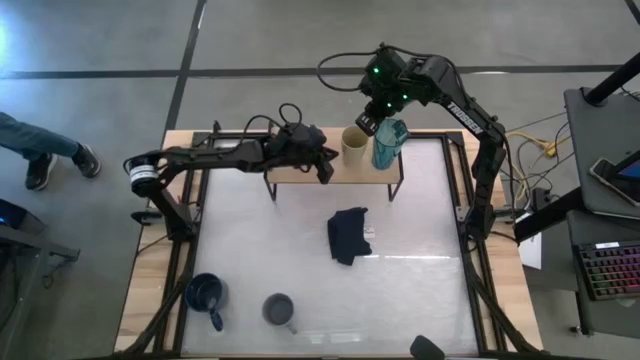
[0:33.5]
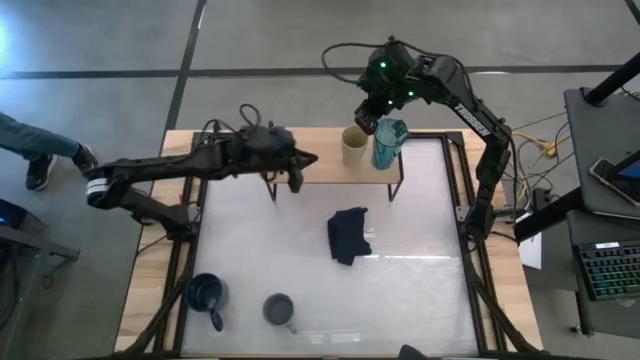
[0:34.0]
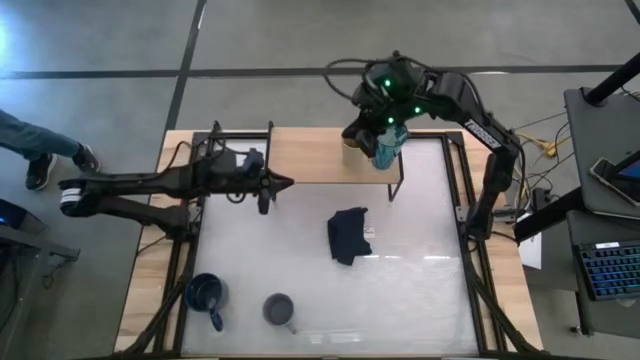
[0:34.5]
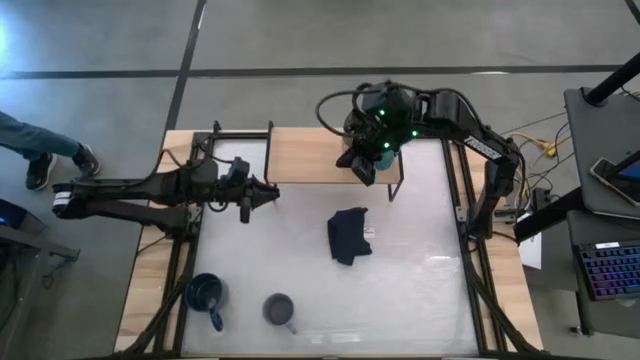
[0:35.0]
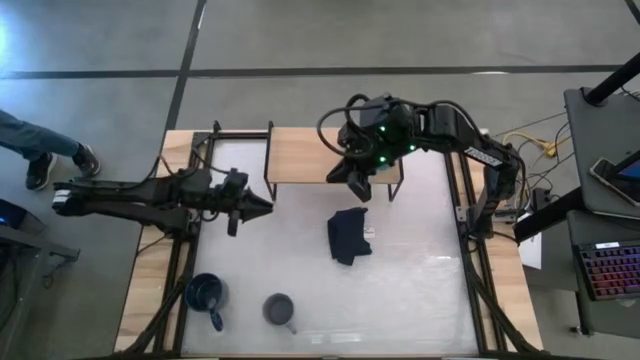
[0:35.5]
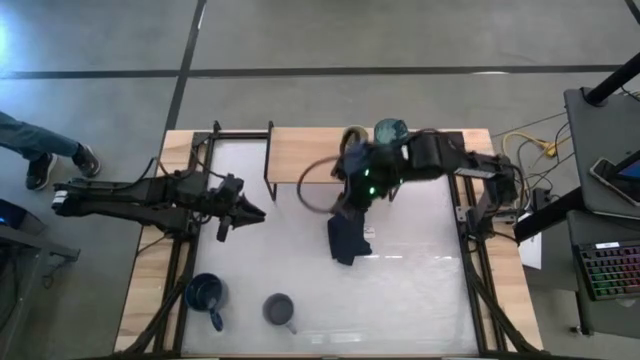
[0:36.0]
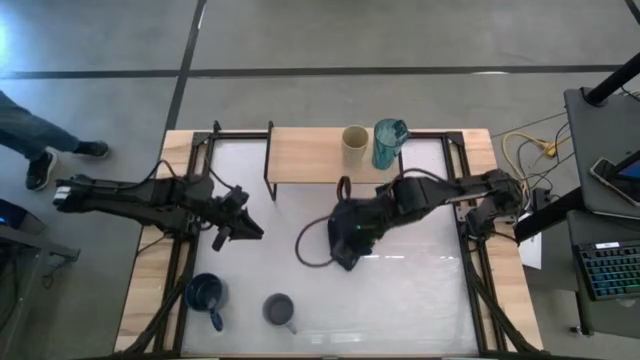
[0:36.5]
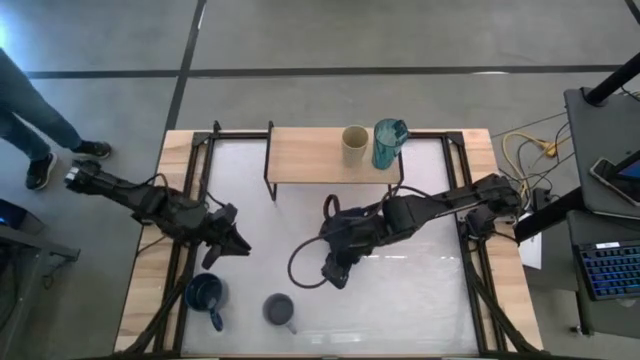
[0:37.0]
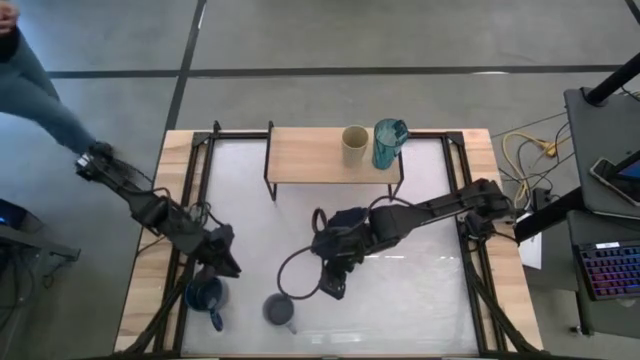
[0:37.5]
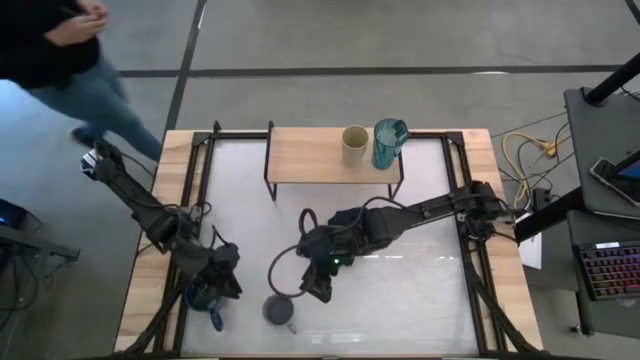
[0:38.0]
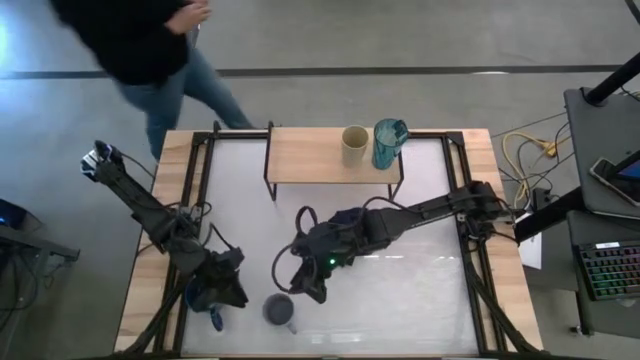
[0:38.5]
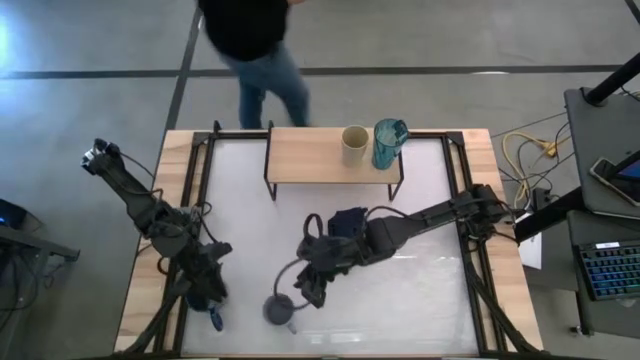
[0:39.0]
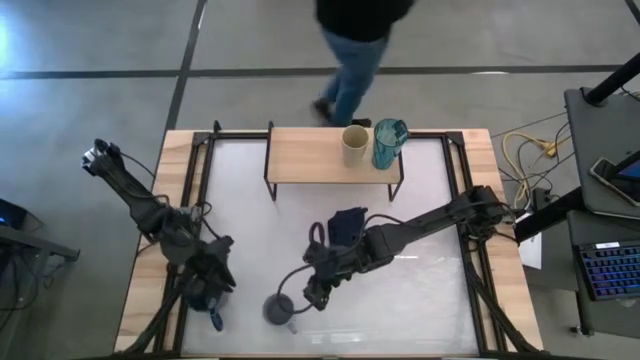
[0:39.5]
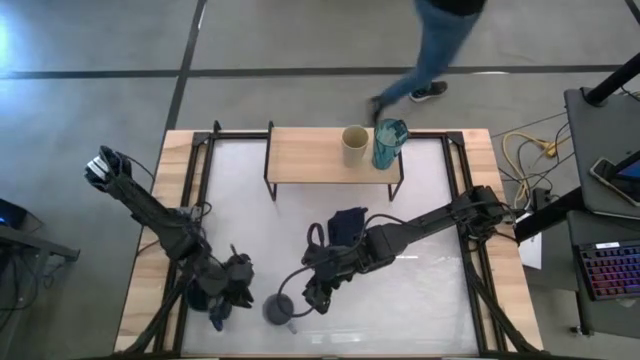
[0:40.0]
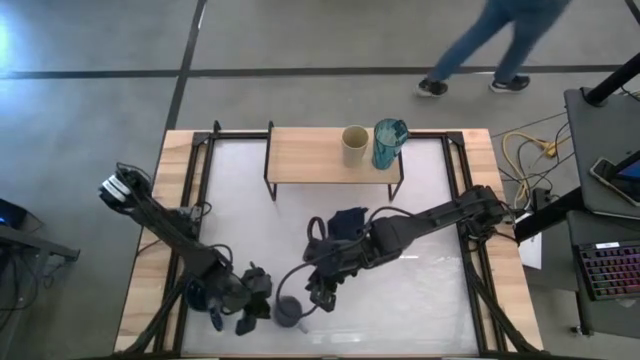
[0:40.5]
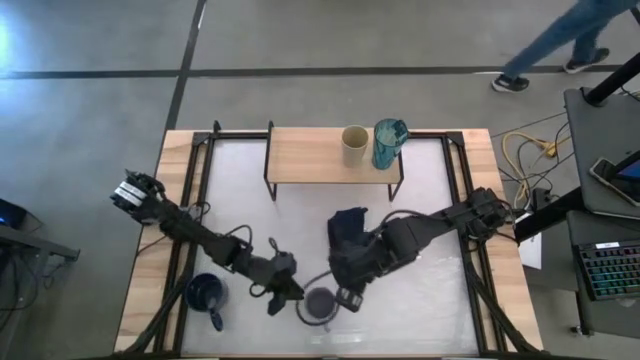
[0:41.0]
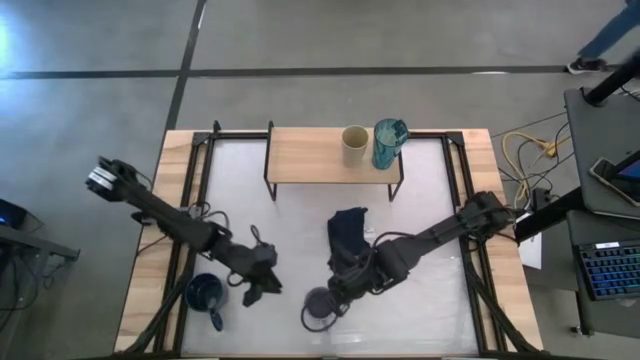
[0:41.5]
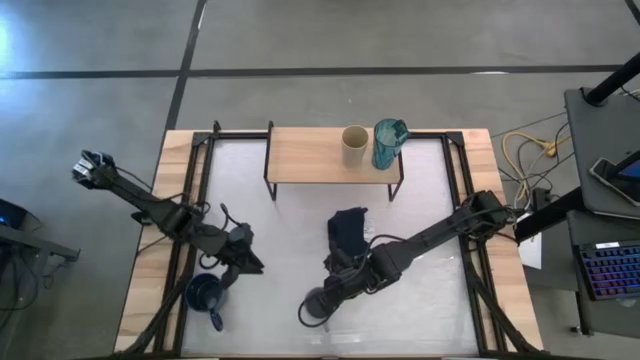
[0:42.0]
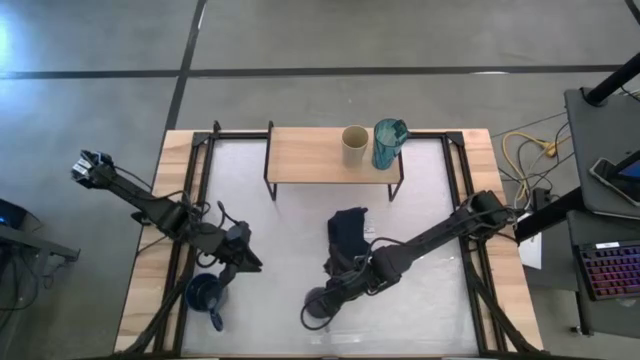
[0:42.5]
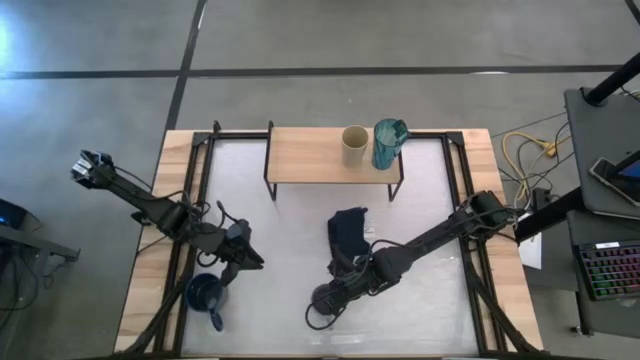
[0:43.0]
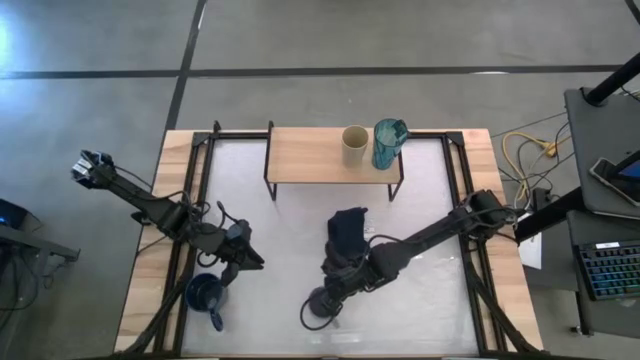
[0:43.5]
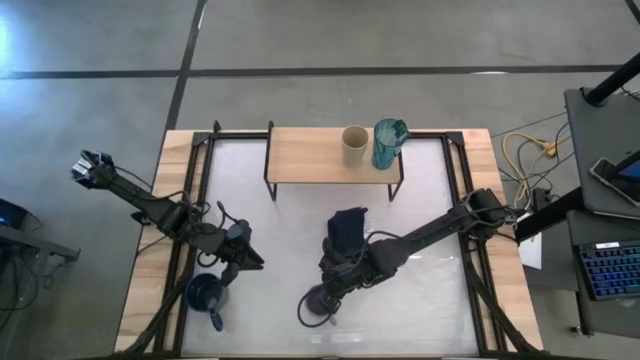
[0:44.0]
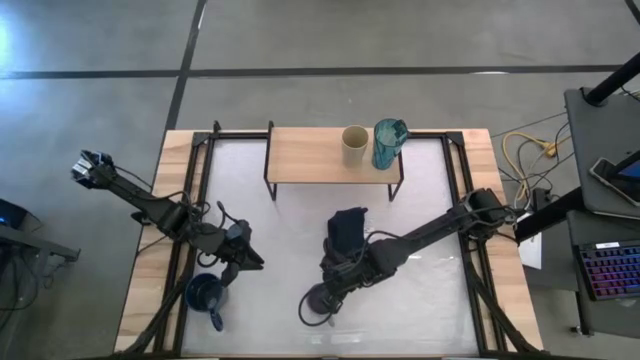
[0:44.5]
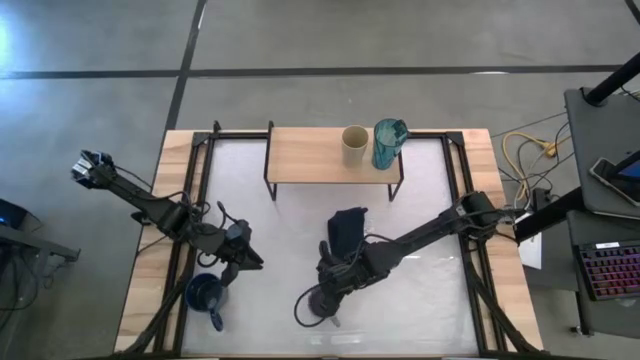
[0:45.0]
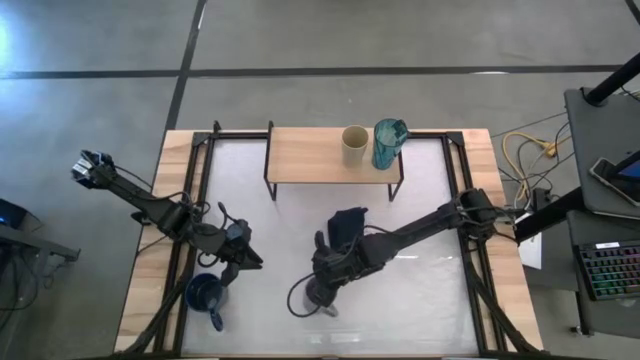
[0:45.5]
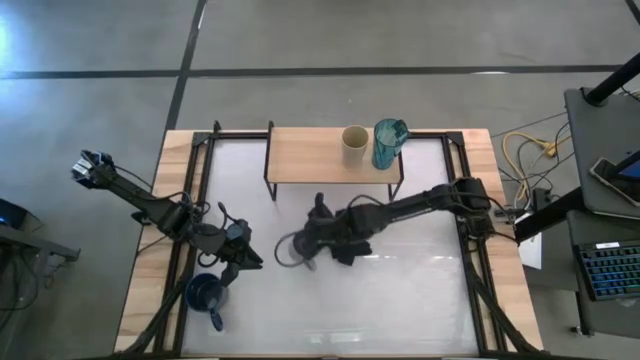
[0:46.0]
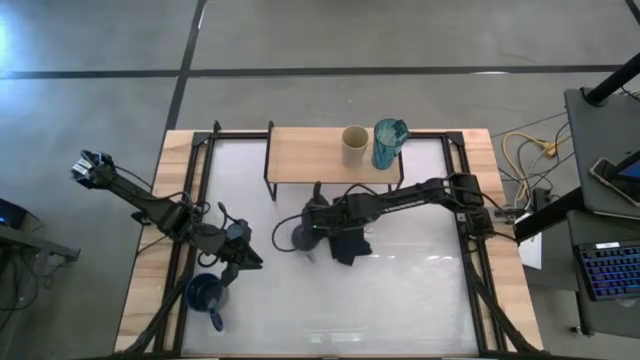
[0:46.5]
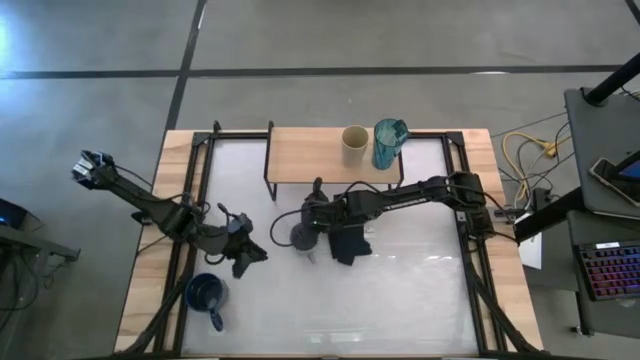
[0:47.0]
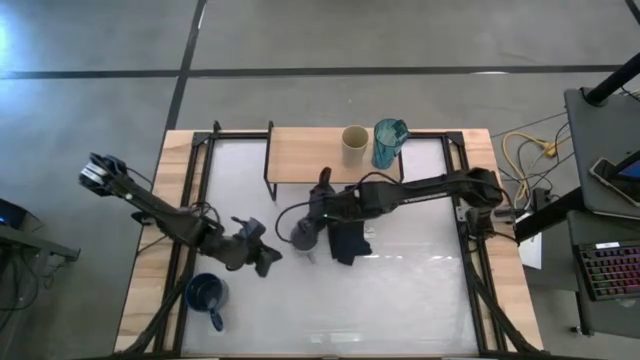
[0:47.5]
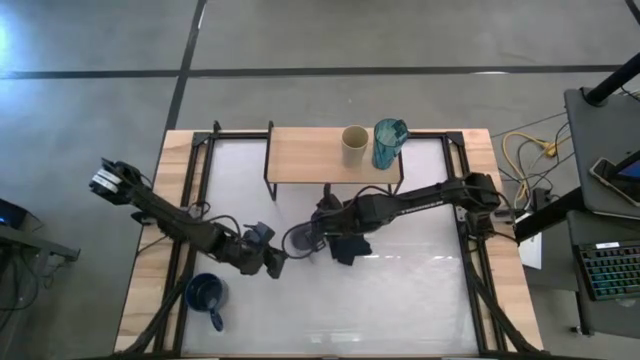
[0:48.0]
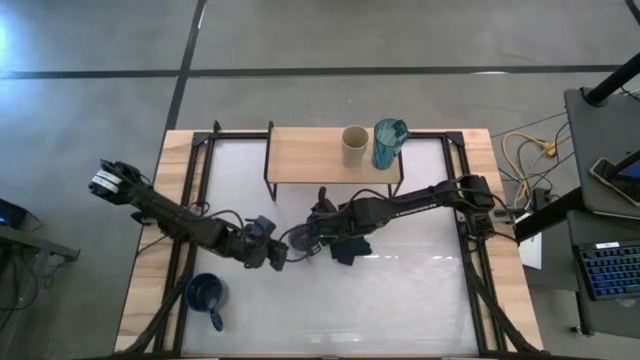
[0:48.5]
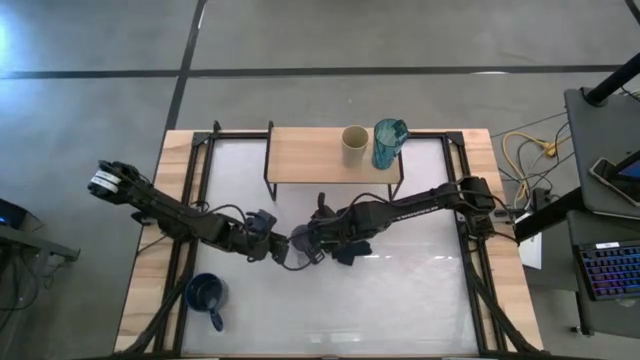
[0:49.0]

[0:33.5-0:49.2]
Task: Stack small to large cups/mugs on shelf
Put the gray mug on the shelf

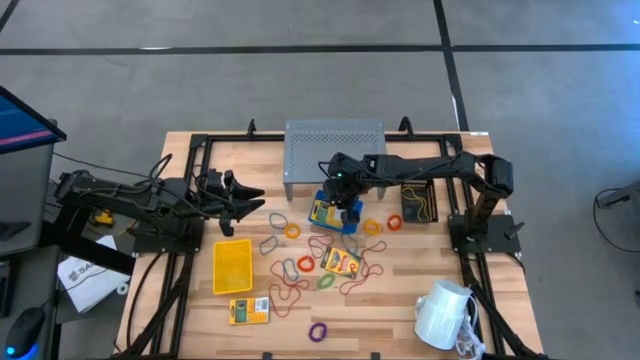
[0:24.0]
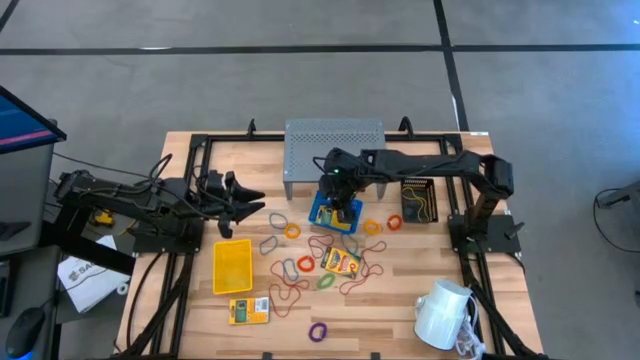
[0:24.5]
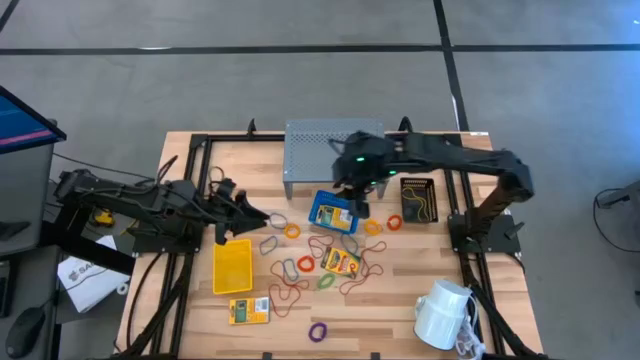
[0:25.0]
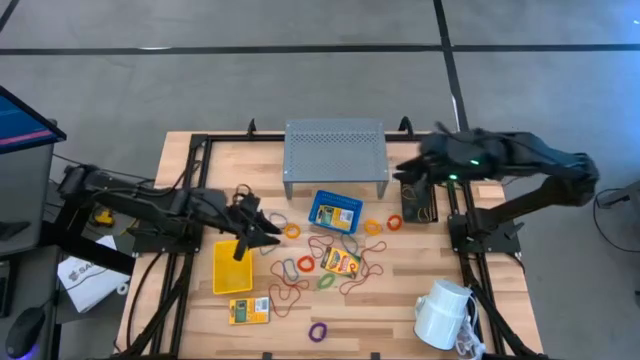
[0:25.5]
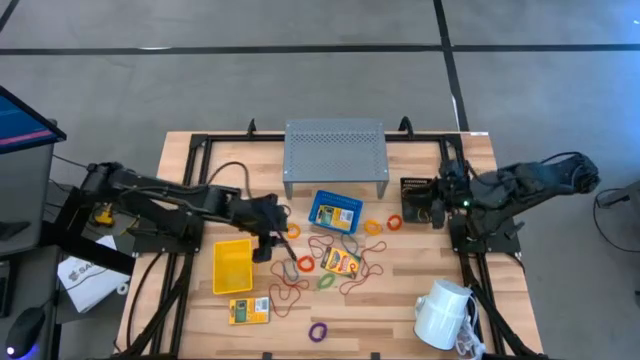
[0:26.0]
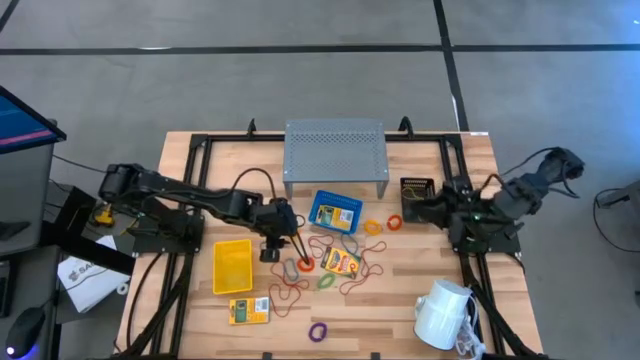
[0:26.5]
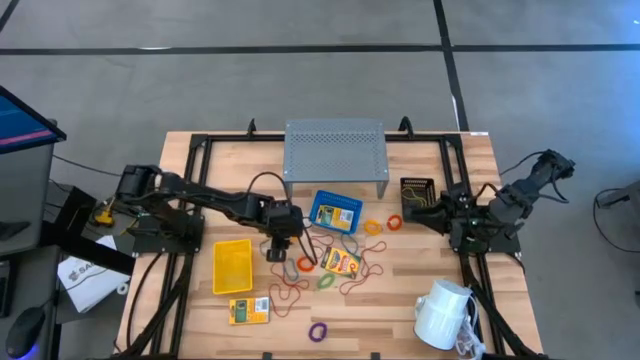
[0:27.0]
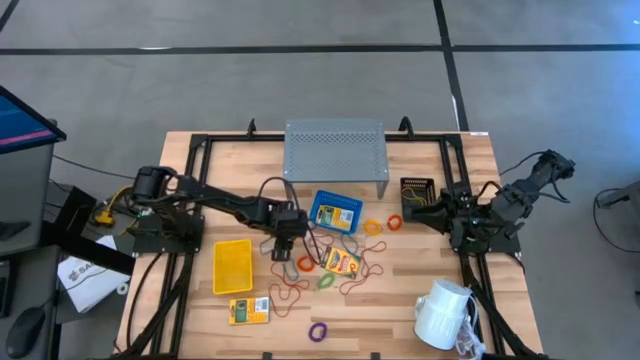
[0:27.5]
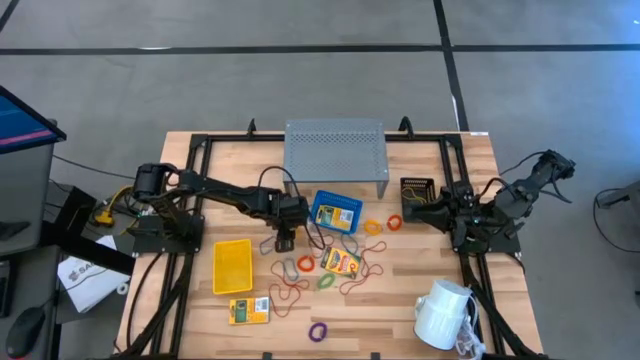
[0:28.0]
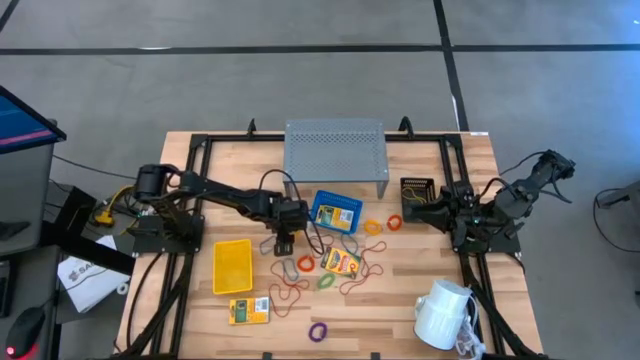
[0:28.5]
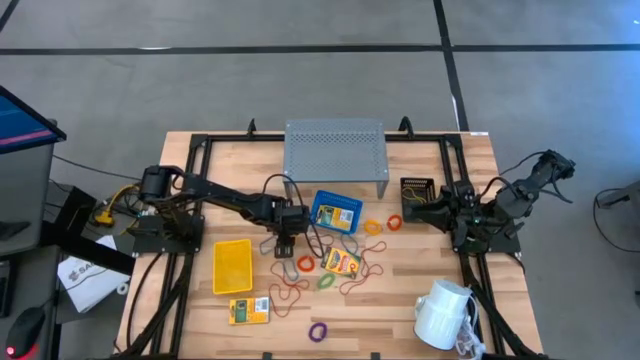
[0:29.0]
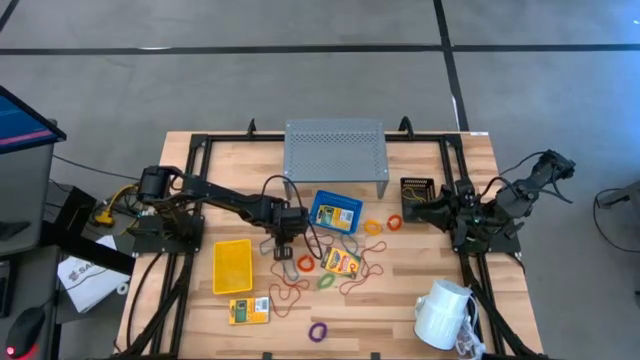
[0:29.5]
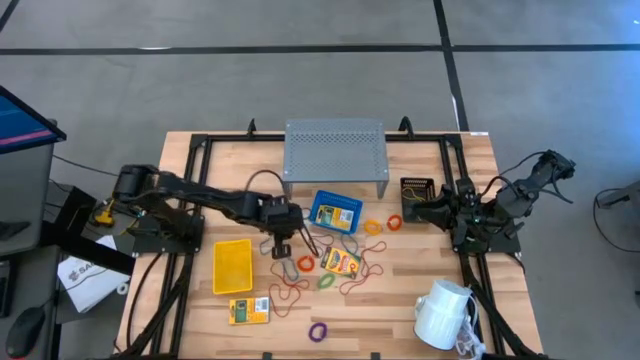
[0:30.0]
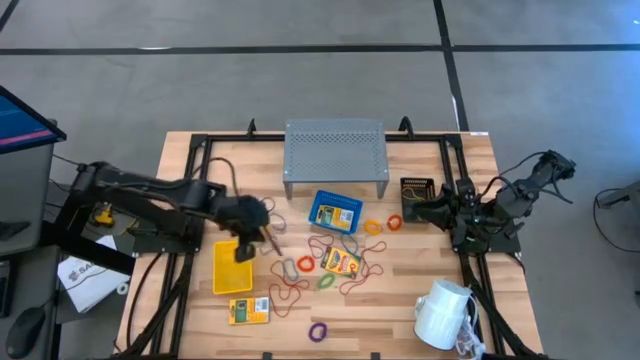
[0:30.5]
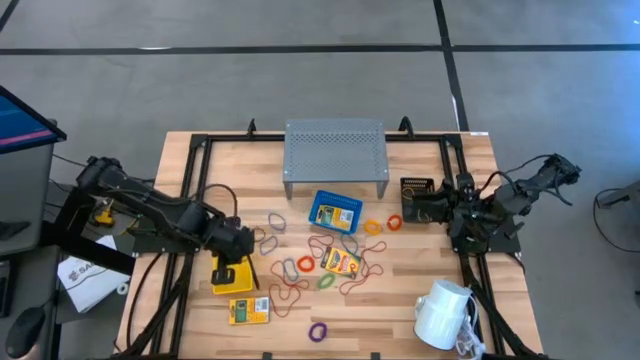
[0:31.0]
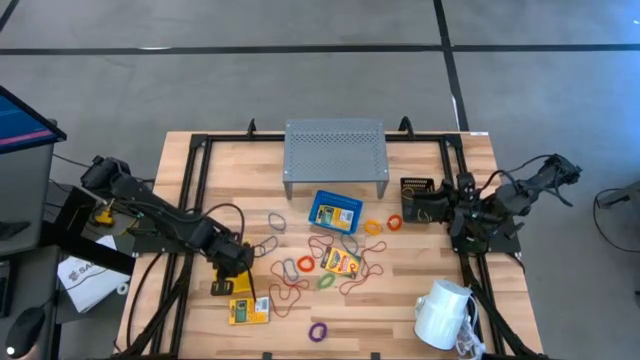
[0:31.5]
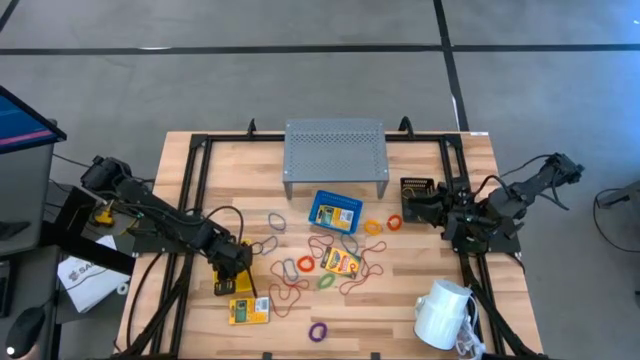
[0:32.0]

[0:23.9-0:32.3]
Task: Pick & Place Office Desk Supplies
Put the yellow spring keychain into the yellow bin
